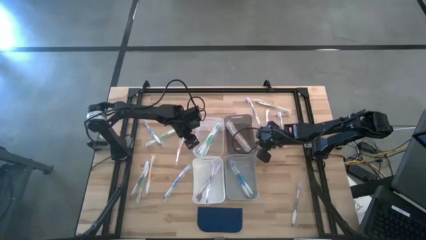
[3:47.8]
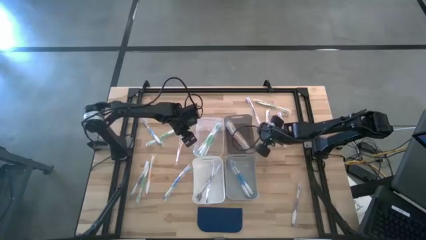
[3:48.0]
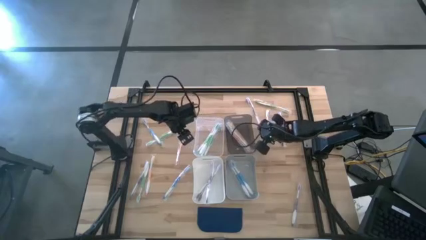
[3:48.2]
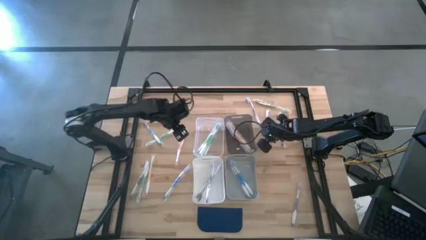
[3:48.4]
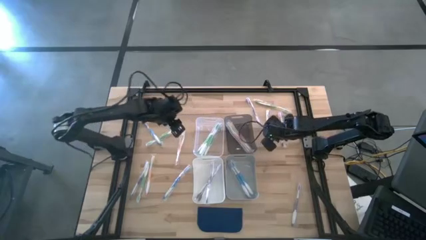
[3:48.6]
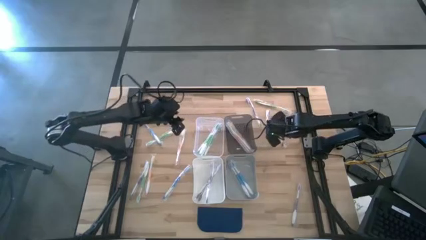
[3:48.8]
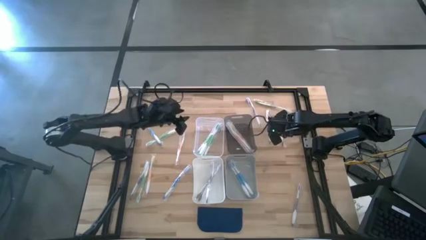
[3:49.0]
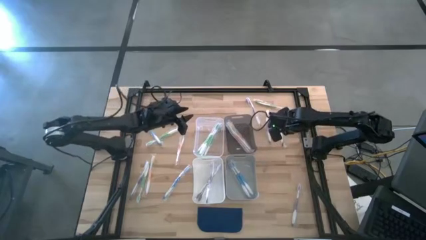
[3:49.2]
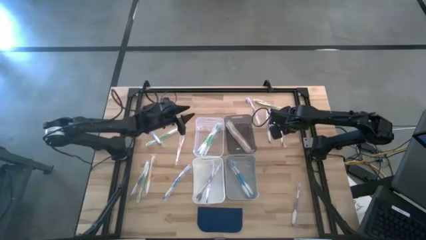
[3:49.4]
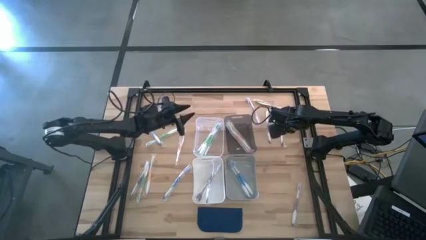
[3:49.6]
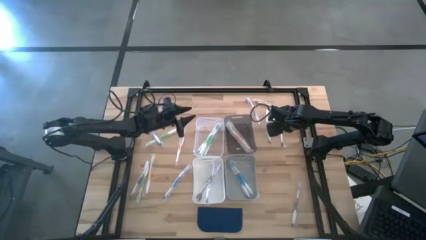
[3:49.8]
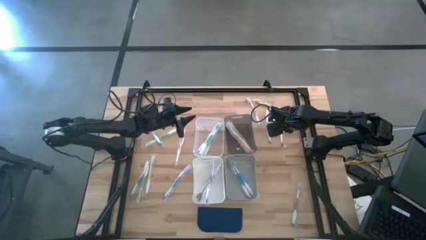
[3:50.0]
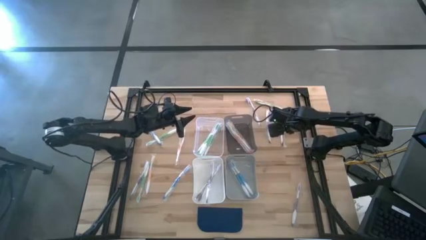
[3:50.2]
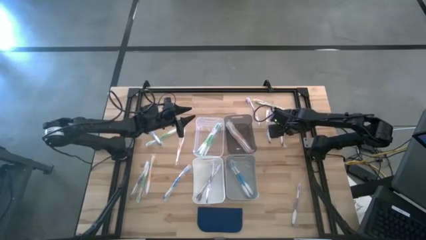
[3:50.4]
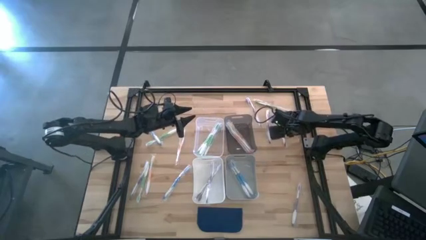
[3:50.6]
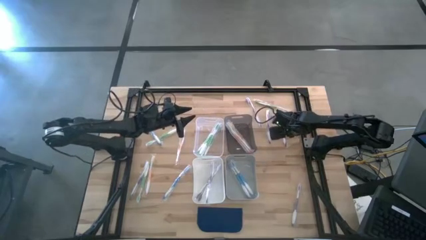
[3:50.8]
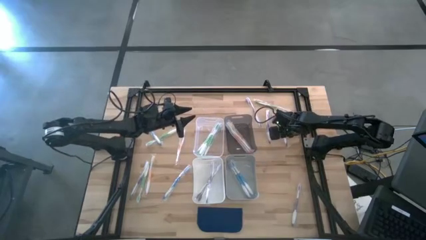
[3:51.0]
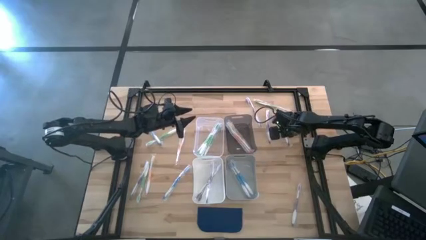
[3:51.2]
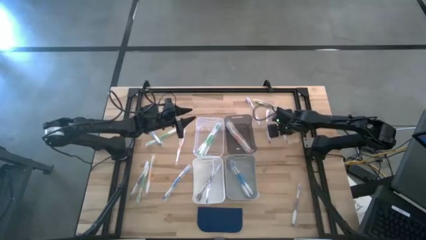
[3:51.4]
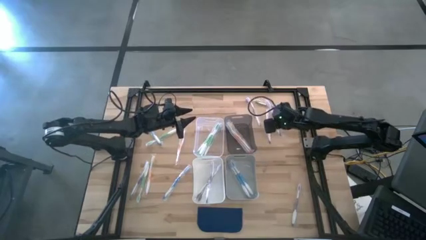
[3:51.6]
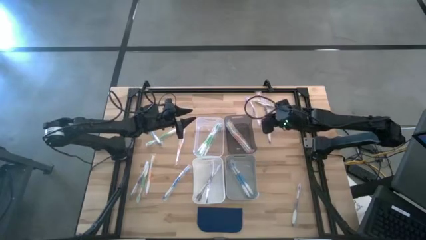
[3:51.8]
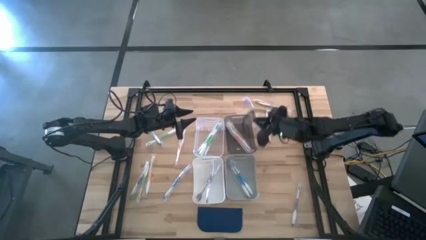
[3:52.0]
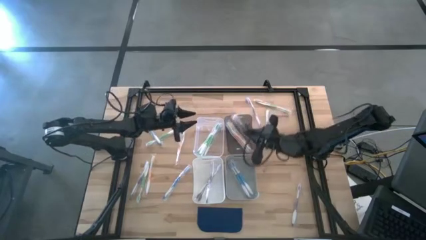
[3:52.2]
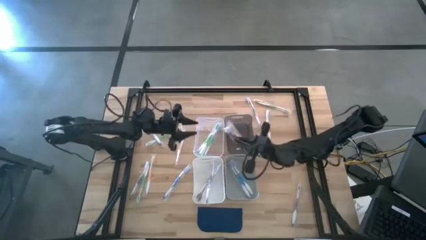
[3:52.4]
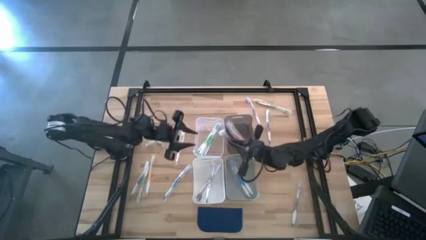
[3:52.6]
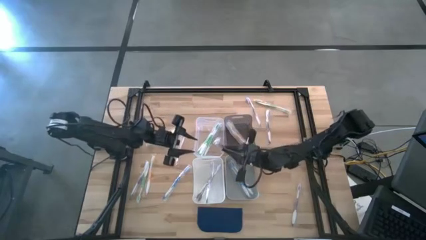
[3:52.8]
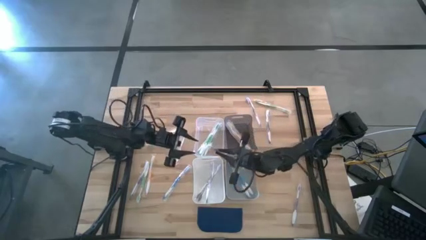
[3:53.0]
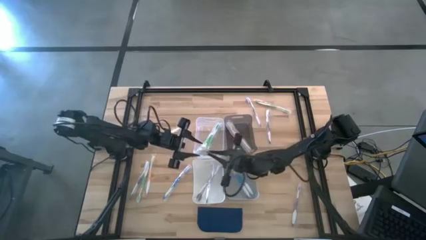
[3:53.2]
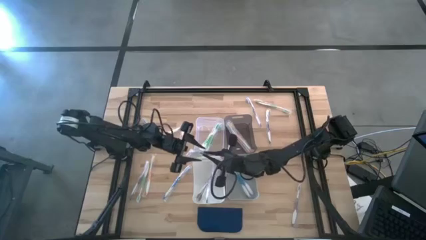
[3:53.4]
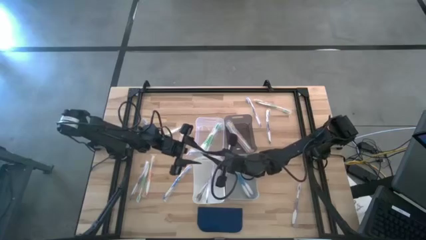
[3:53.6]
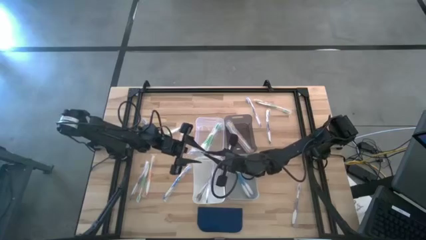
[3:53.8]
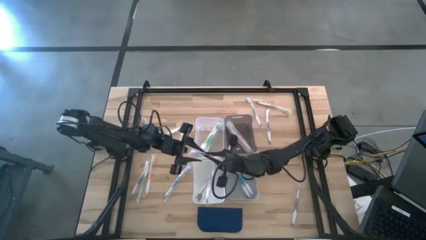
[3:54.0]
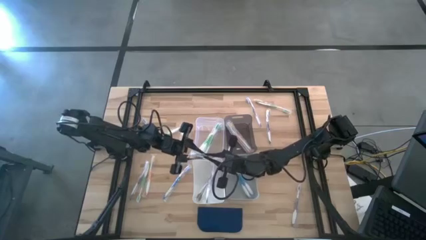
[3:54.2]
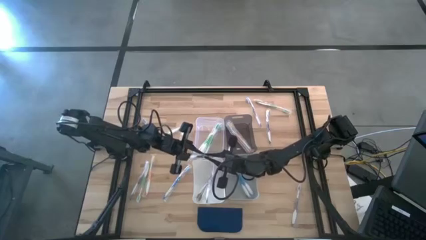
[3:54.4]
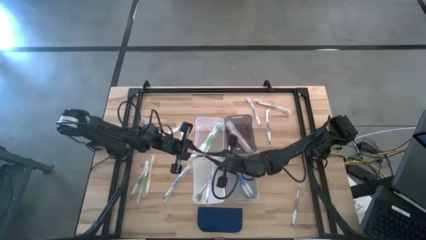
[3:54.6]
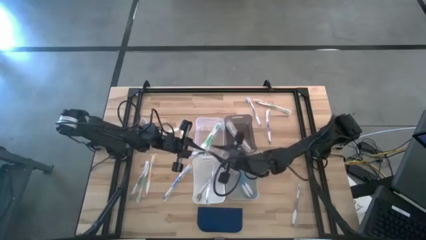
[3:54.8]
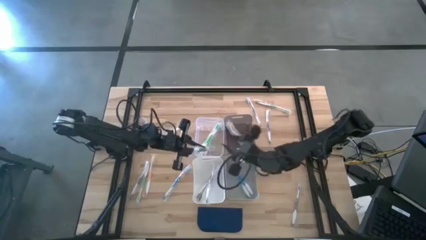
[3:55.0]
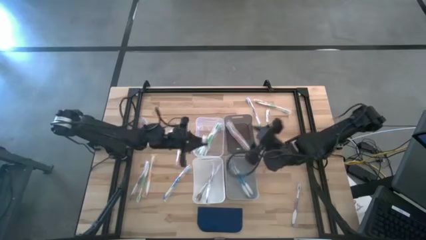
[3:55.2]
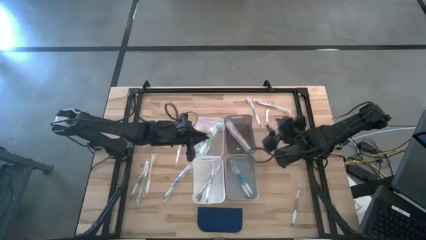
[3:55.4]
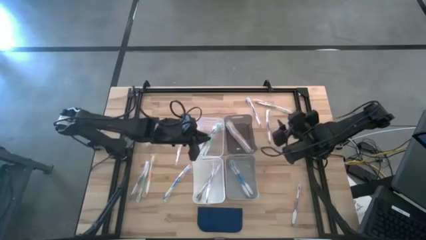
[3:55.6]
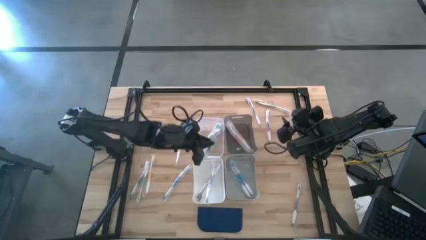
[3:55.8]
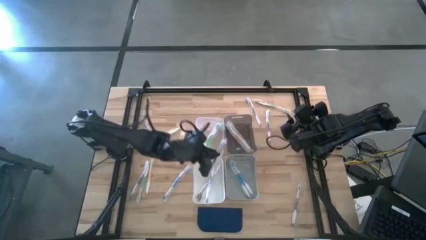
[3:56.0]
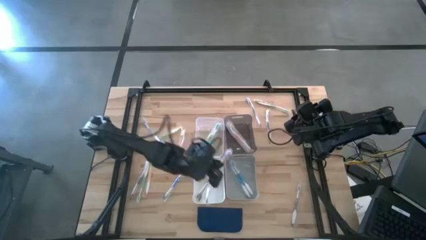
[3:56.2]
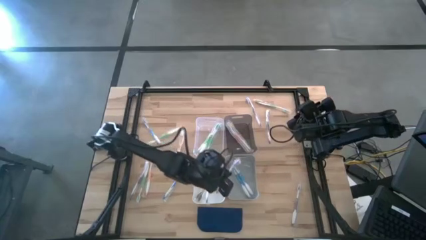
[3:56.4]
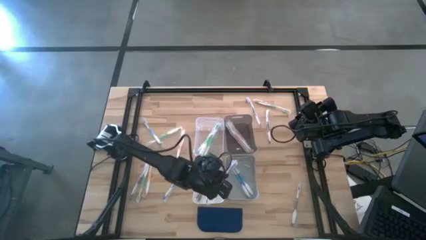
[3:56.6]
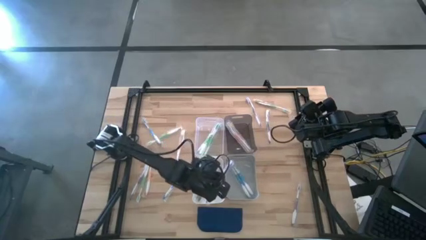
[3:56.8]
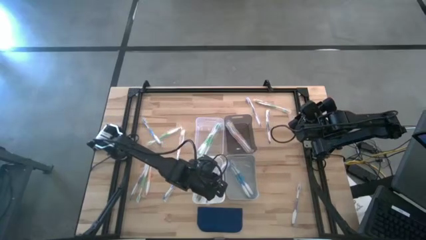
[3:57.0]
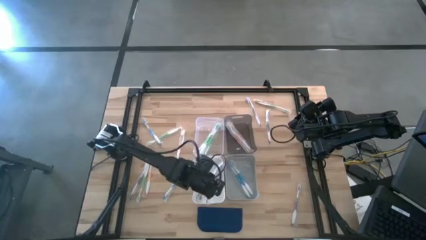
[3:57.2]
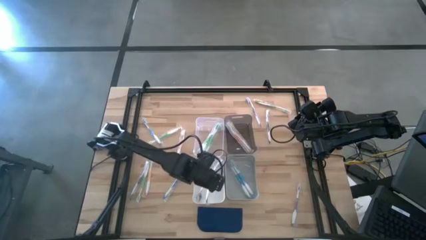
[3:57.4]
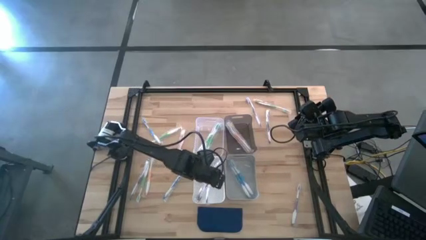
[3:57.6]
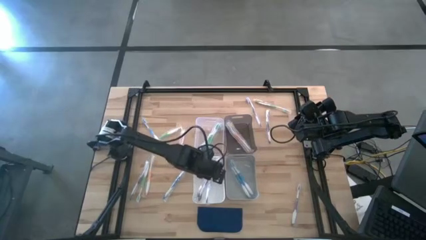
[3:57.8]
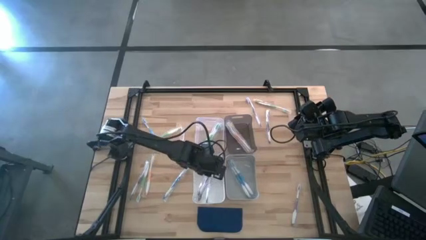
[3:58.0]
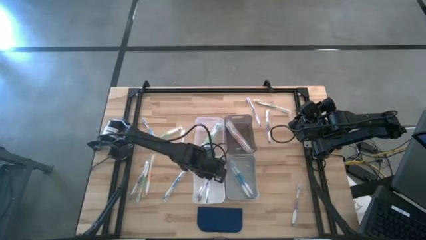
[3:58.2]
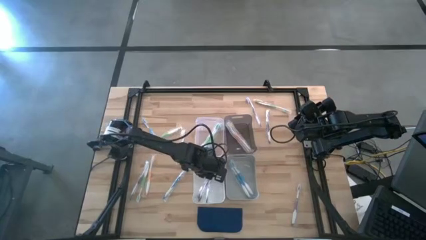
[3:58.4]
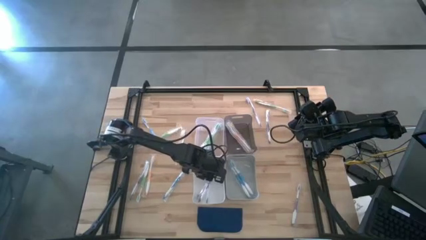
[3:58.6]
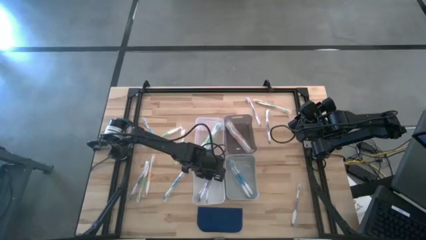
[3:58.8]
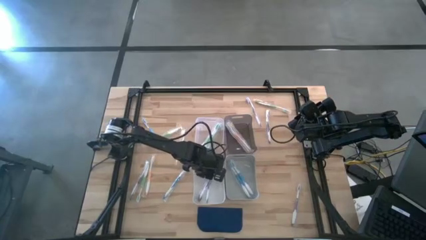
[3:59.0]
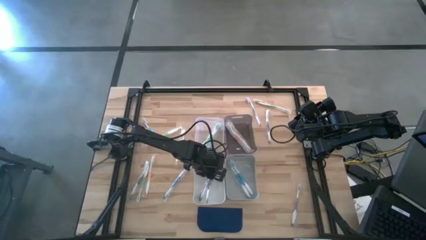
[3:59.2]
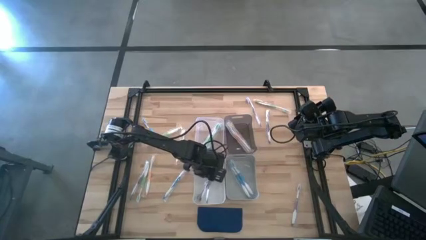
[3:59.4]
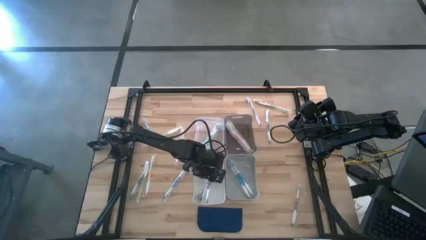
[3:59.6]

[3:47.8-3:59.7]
Task: Pick & Place Toothbrushes
Put the violet toothbrush into the white bin

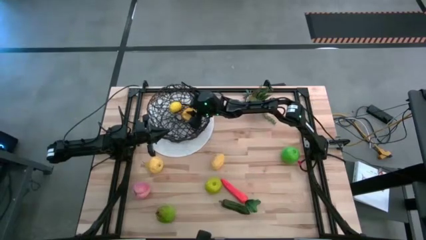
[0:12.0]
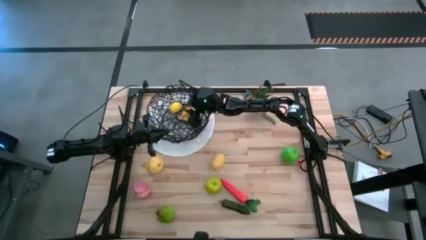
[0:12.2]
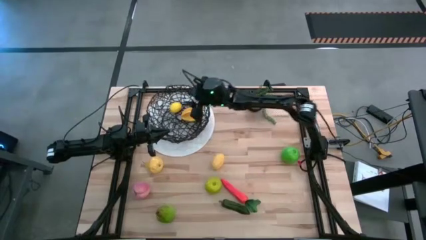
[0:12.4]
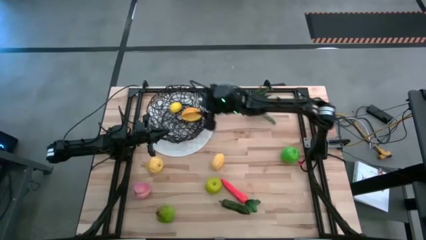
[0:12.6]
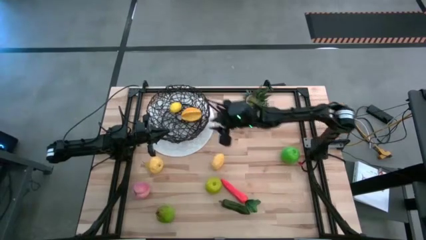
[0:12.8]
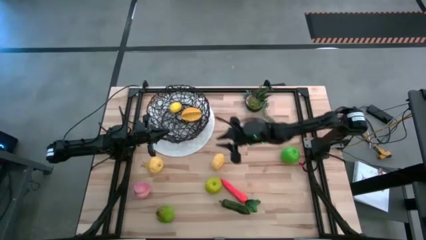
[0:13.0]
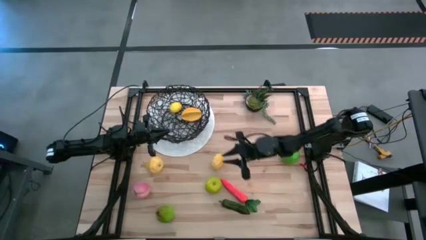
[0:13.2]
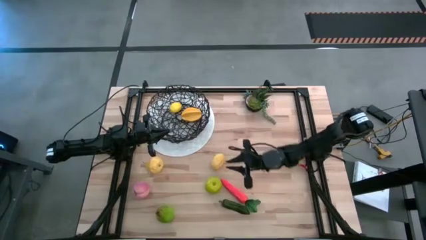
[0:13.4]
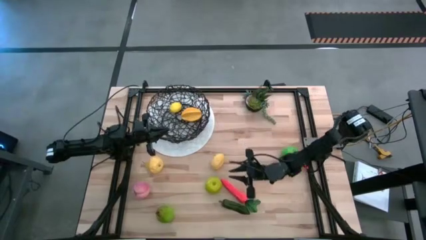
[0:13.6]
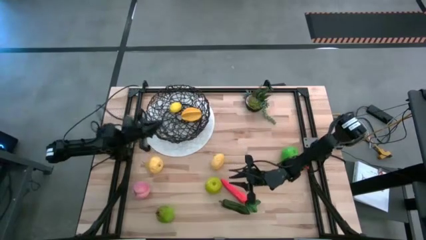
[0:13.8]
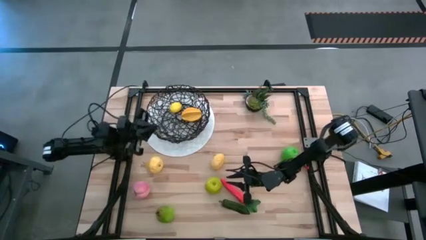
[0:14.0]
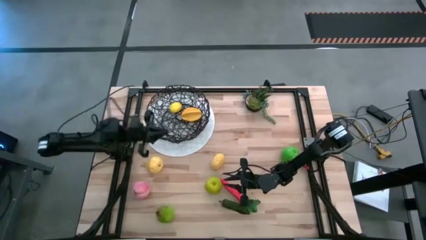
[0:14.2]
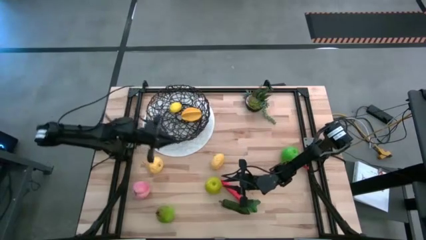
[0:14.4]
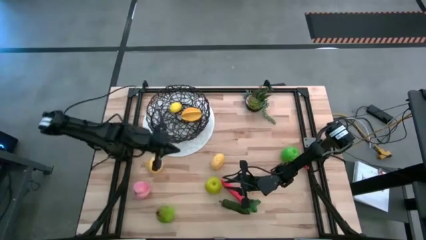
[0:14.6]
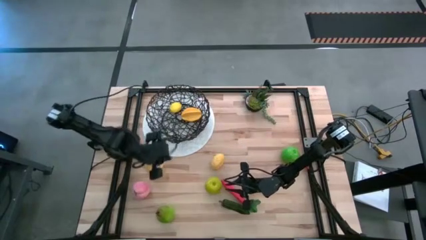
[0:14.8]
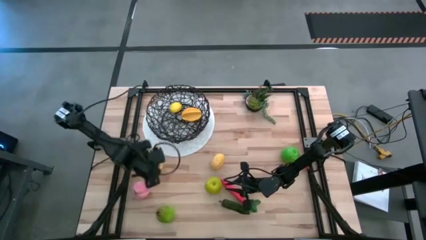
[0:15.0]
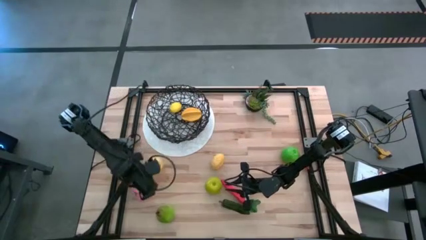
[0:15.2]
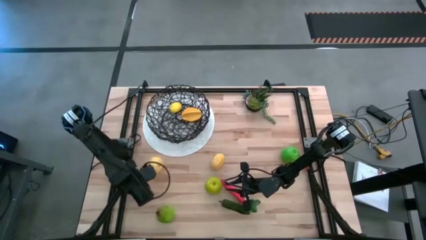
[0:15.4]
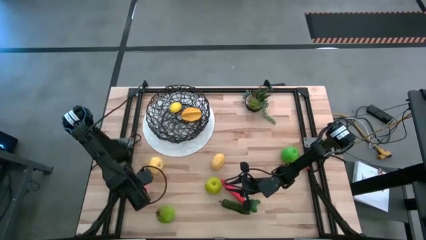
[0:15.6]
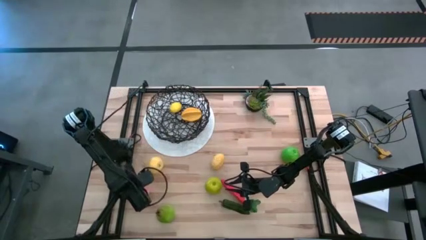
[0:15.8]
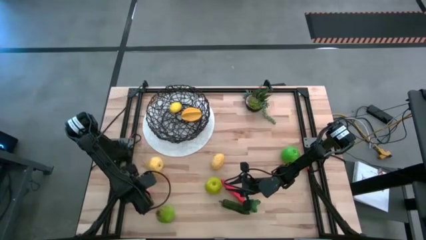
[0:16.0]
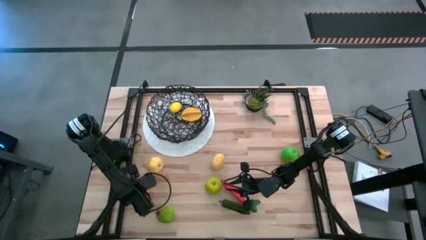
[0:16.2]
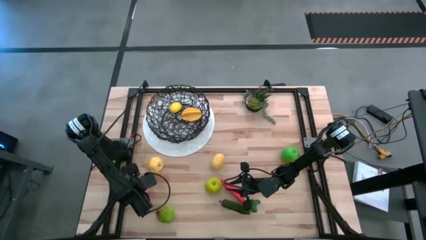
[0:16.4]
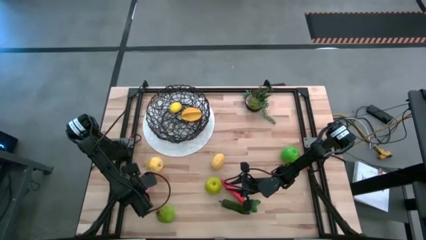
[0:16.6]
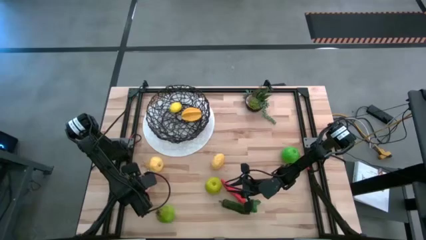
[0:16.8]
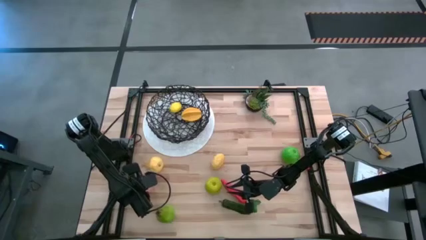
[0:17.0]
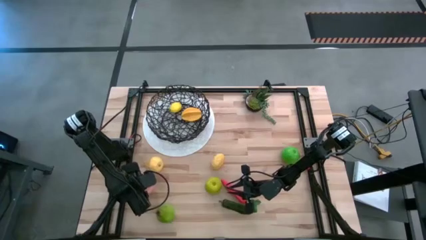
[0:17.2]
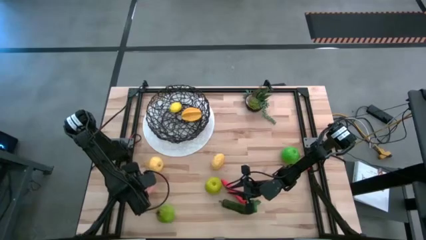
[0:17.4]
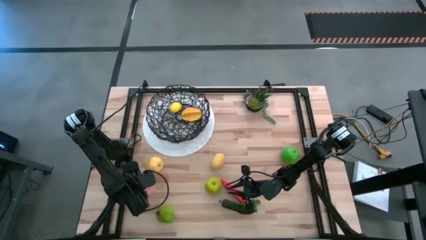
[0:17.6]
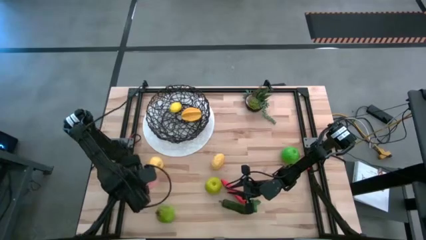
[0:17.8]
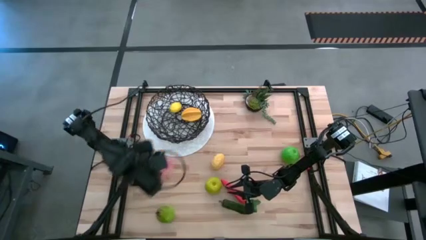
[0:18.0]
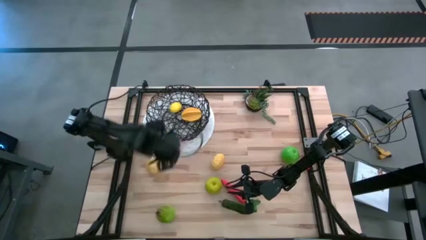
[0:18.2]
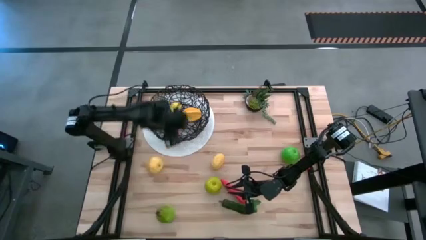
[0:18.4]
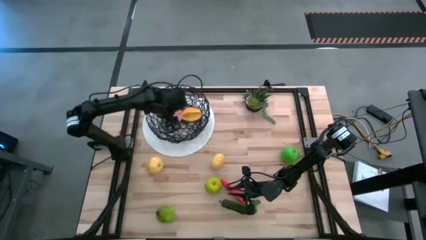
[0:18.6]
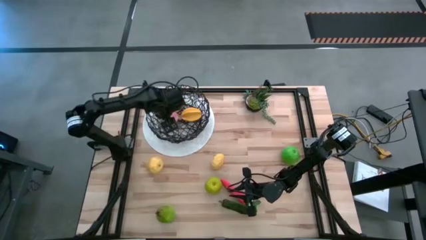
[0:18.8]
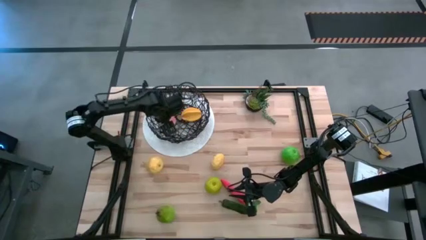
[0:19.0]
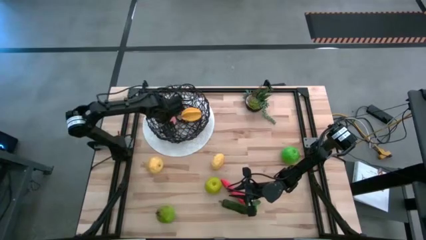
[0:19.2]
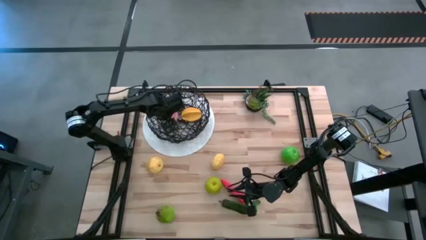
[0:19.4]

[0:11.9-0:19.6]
Task: Build produce basket
Put the pink peach into the wire basket
